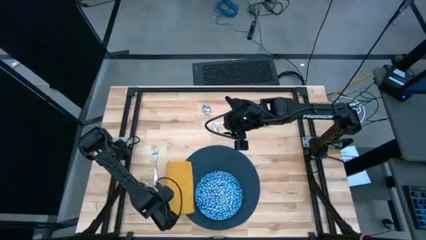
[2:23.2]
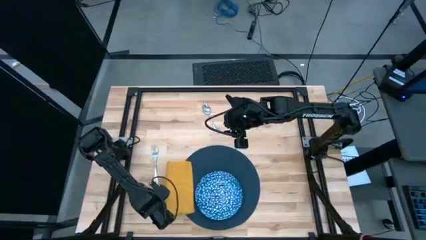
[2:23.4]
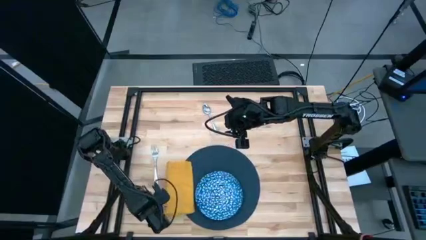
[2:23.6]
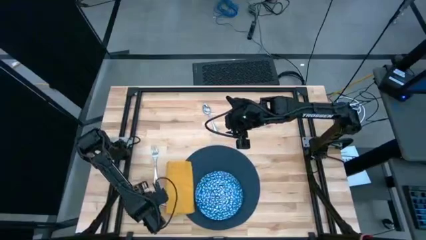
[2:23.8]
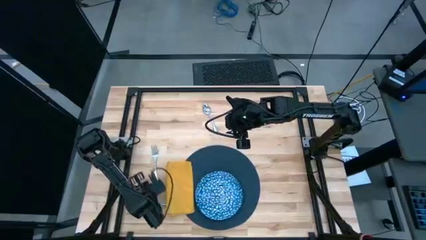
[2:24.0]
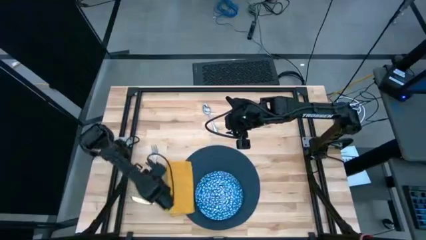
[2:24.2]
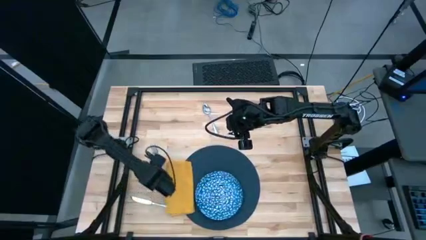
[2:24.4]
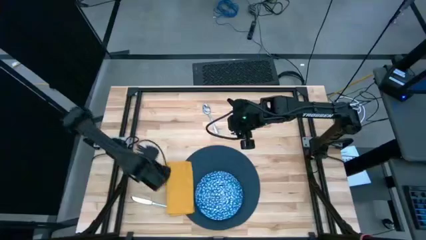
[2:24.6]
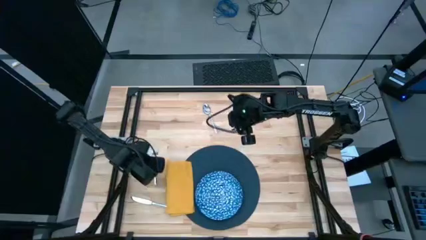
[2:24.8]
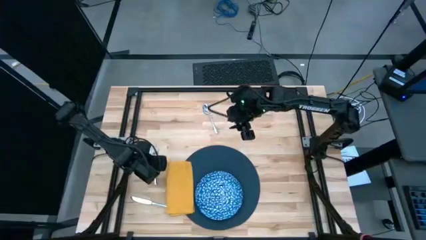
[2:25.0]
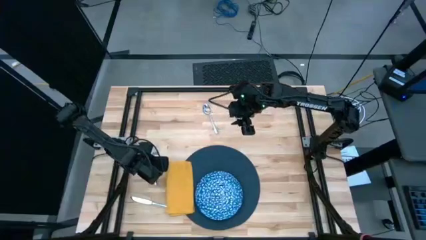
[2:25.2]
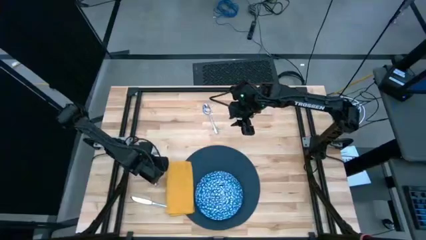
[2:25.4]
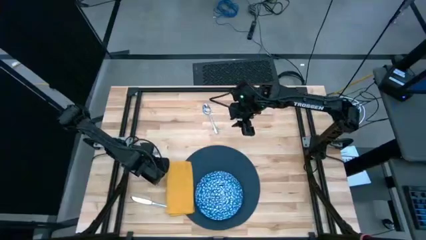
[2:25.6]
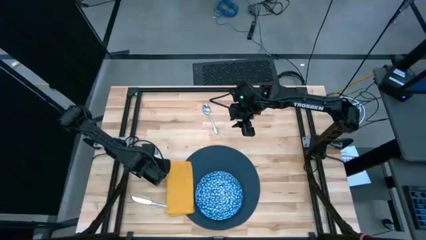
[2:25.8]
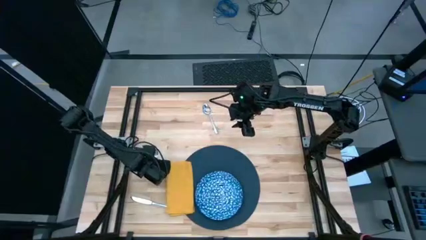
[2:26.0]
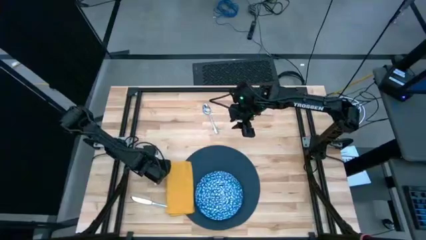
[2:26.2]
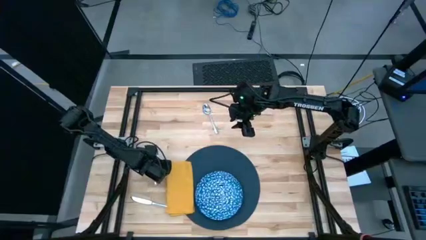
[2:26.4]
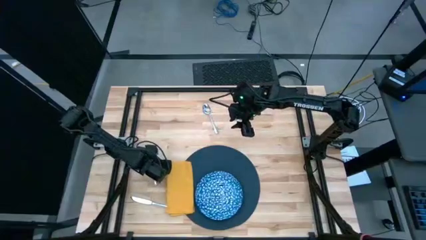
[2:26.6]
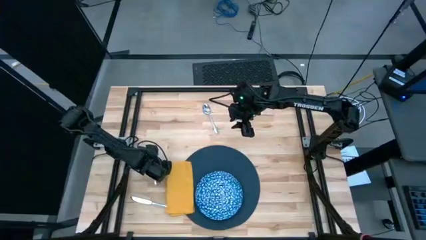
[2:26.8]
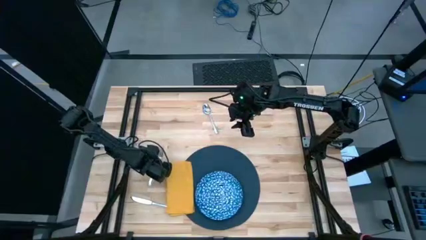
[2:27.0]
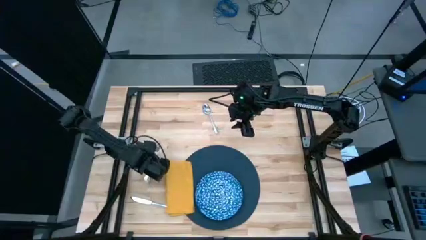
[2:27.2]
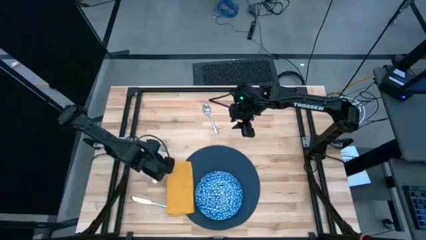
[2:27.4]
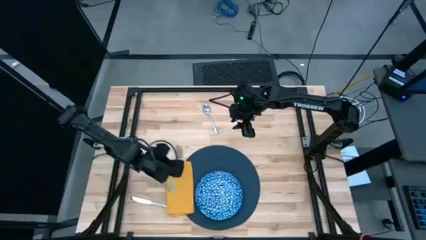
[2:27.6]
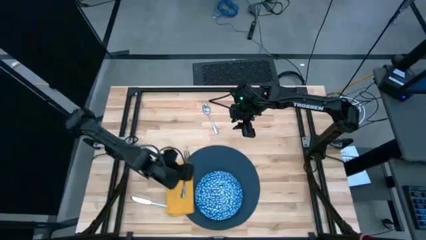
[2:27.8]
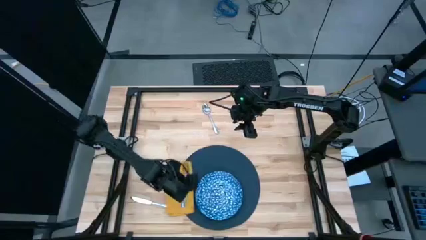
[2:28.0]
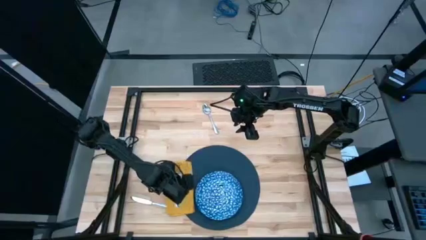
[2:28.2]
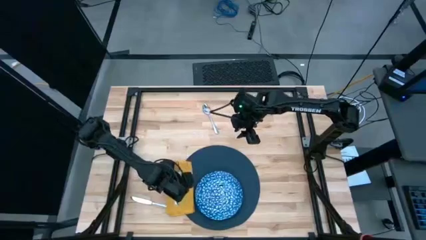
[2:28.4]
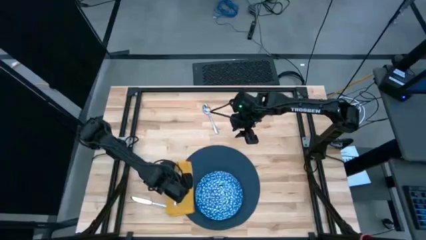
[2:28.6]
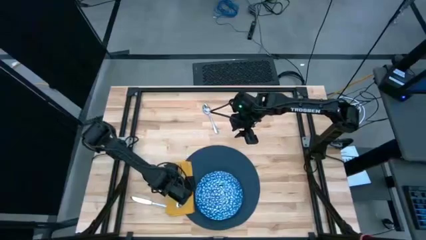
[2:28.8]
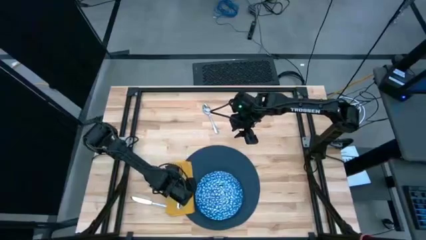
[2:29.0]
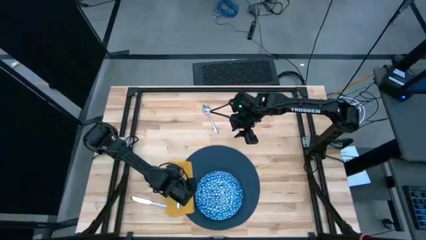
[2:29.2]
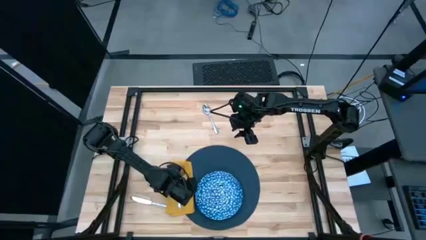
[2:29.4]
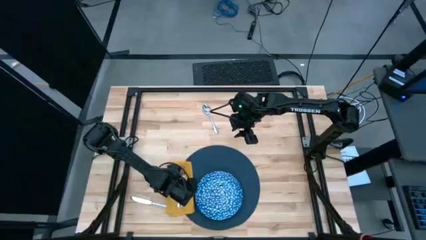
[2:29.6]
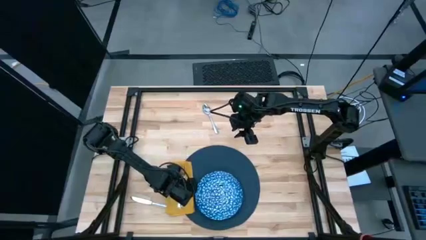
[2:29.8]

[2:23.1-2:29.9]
Task: Set table place
Put the silver fork on the yellow table napkin

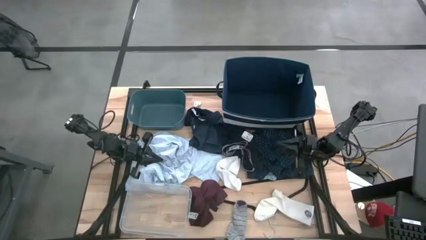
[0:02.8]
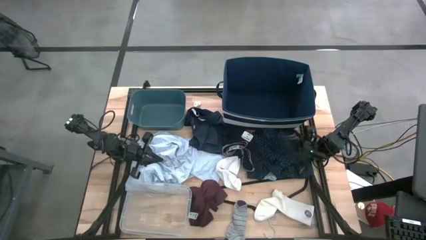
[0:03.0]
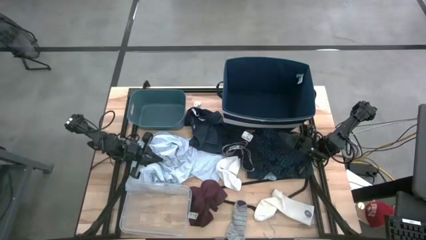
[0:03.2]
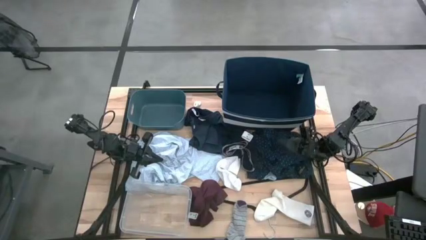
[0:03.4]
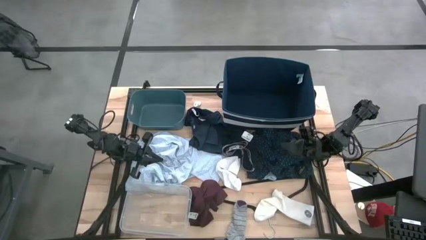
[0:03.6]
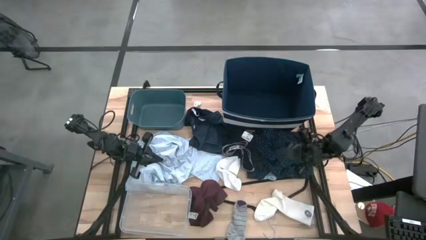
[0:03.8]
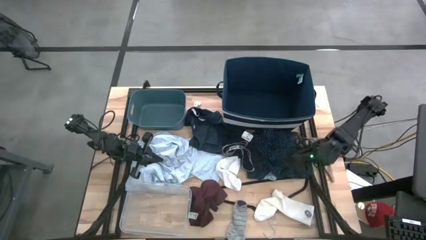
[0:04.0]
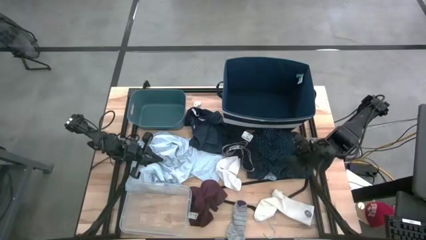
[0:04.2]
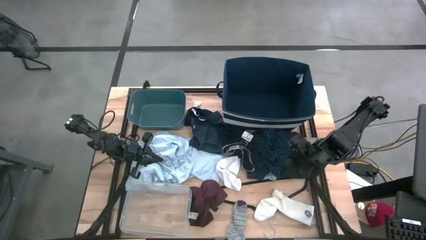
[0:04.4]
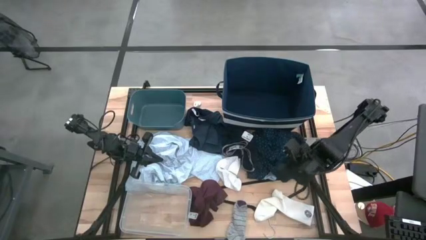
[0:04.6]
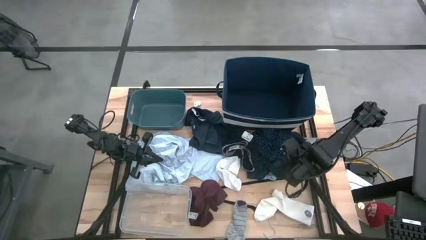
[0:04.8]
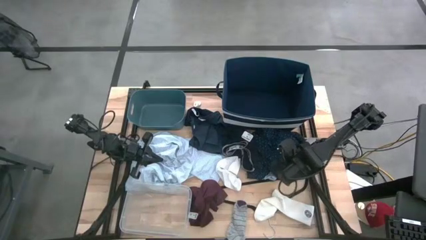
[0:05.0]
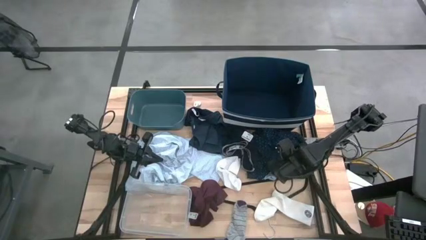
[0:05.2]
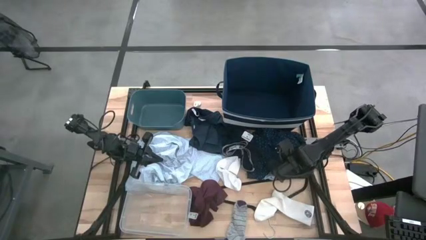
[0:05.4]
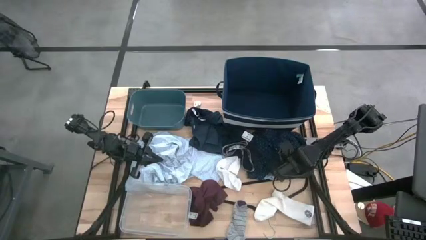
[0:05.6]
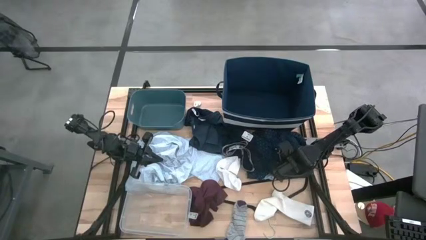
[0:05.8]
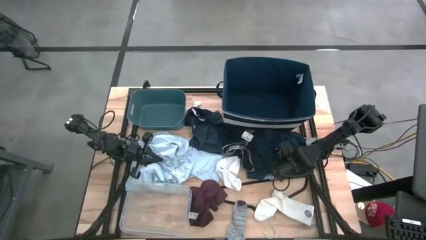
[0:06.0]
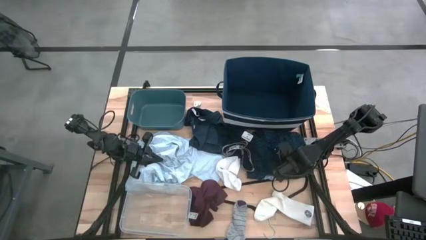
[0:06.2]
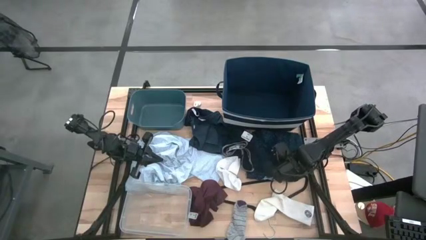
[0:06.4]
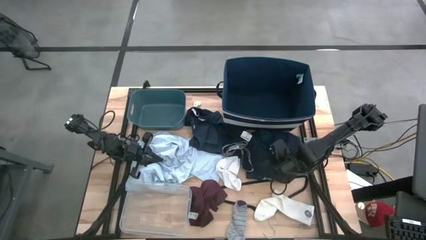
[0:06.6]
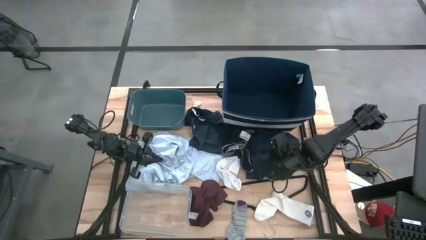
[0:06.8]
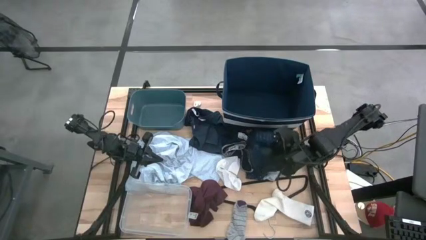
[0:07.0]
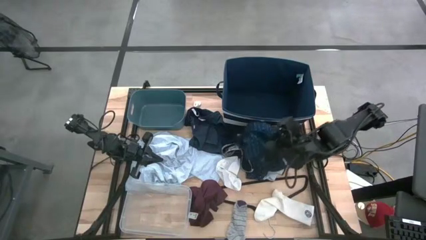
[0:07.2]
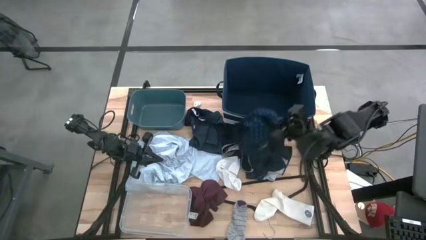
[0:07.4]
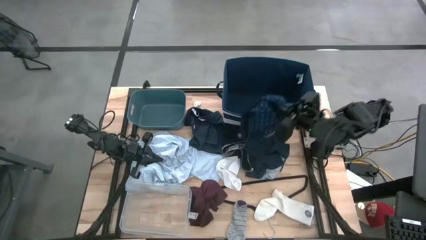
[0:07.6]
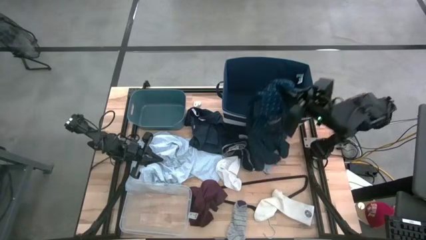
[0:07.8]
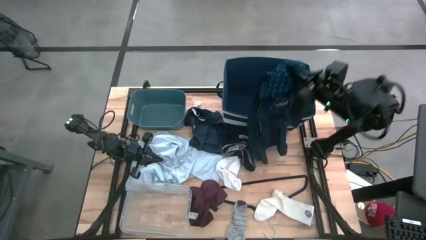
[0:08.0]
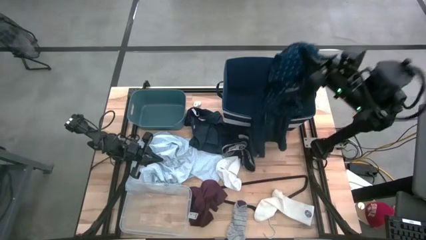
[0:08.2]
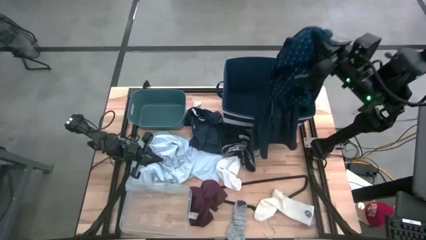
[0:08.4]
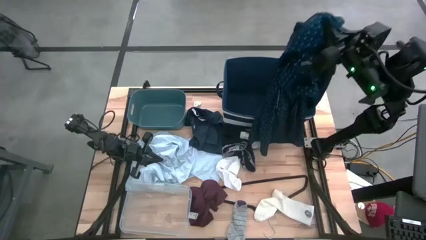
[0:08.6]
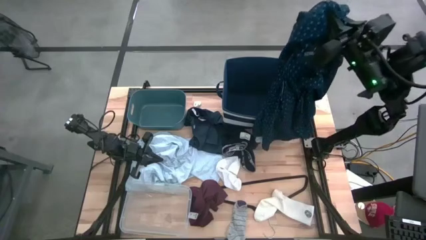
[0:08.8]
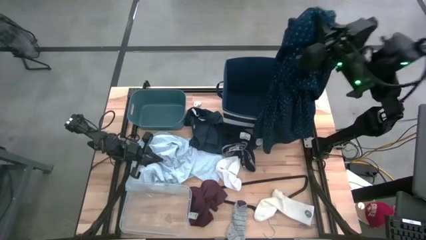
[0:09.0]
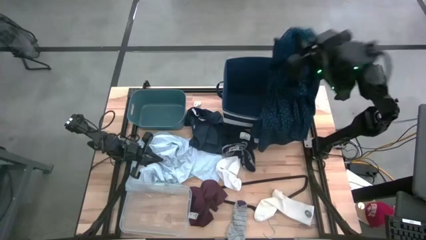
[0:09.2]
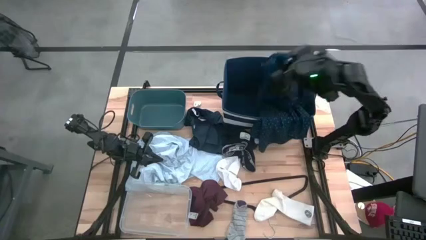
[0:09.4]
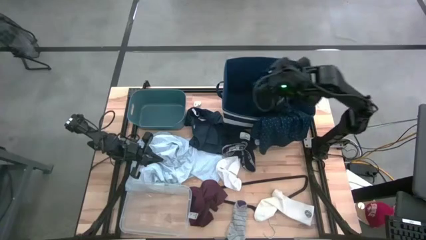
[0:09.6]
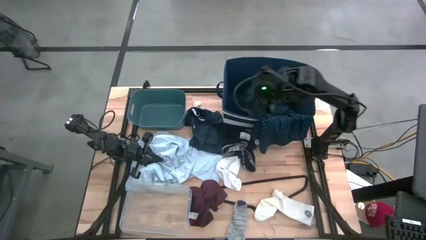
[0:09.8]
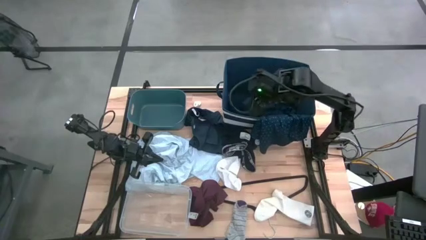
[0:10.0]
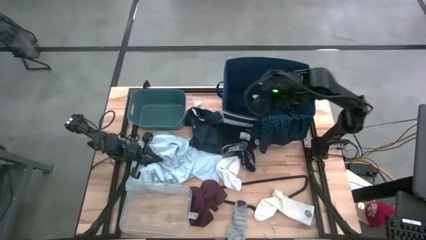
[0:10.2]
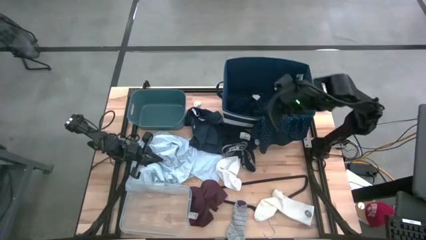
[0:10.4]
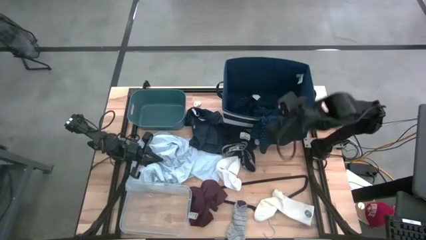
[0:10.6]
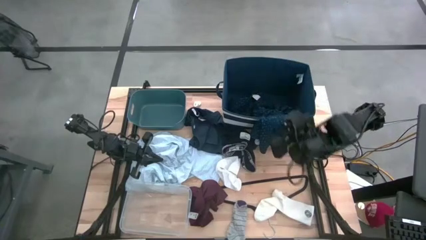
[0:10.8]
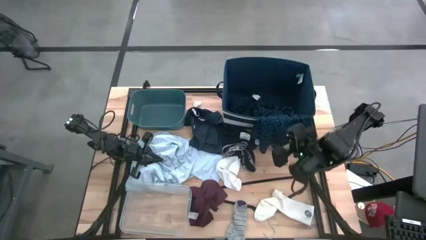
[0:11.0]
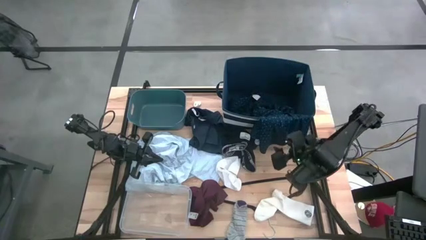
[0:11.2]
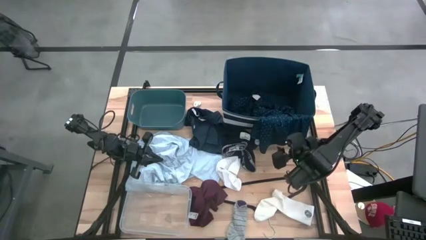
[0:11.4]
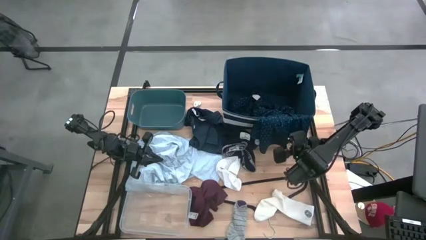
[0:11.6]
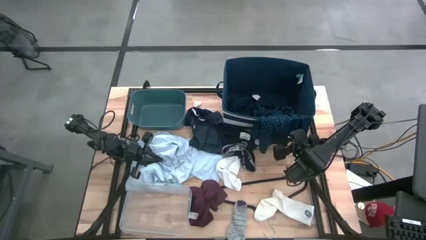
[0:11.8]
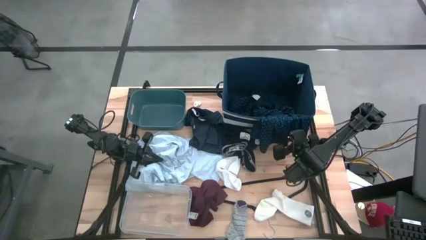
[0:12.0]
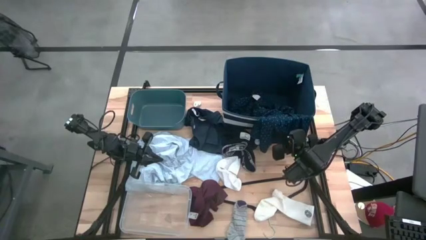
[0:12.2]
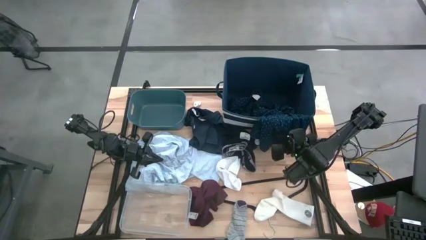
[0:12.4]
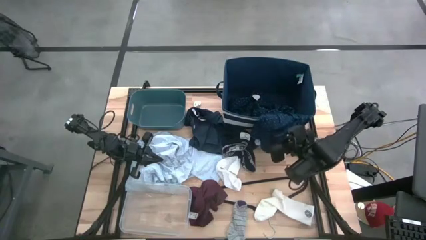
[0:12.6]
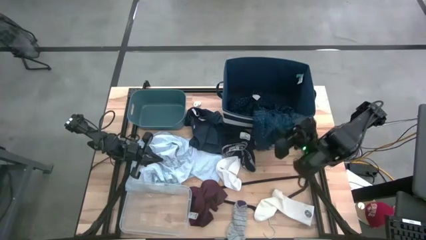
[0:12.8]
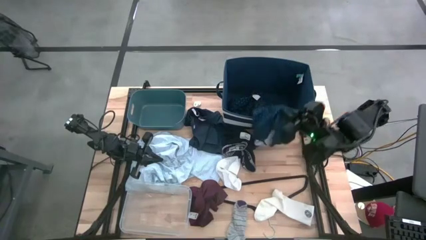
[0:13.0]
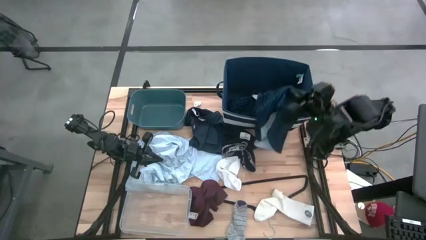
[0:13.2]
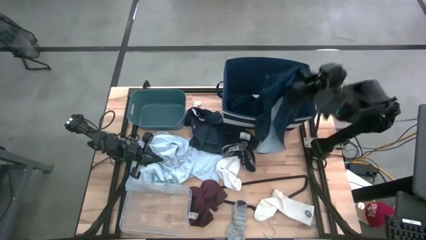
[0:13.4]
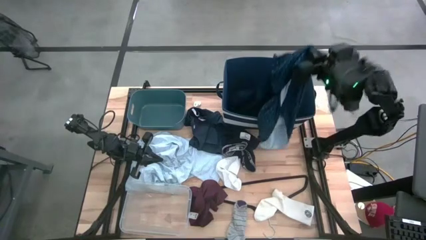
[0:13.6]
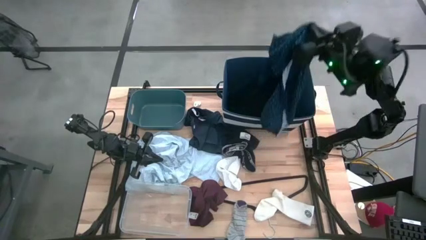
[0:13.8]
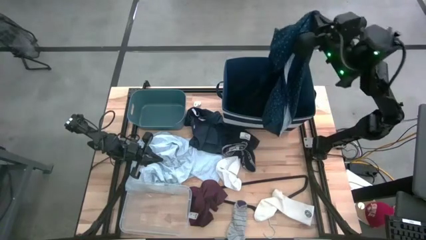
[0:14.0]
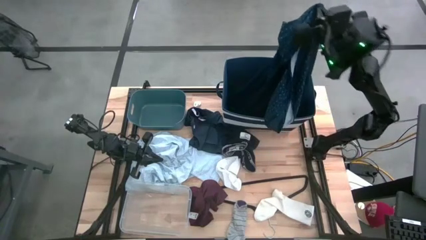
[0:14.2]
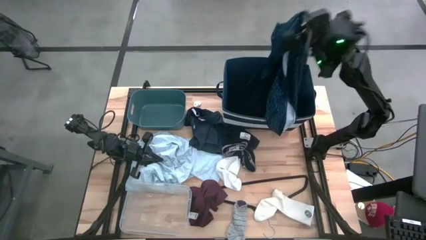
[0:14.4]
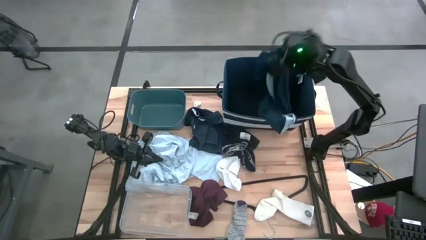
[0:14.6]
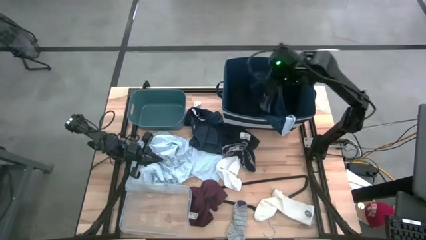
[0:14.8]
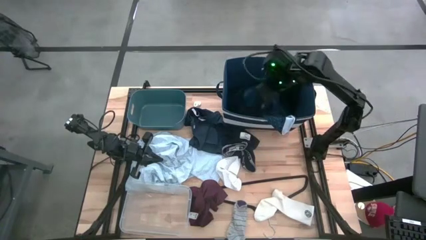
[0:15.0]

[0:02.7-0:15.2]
Task: Pick & Place Cloths
Put the blue long sleeve into the blue bin
